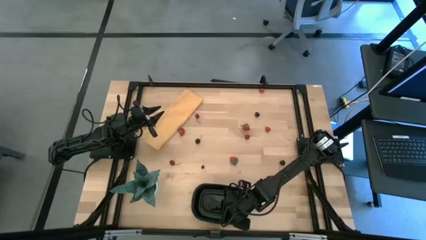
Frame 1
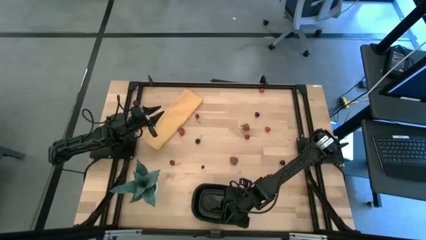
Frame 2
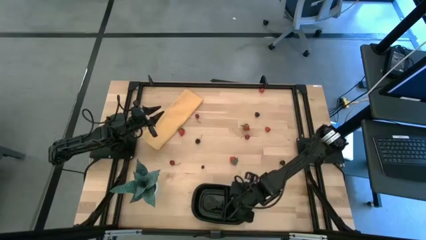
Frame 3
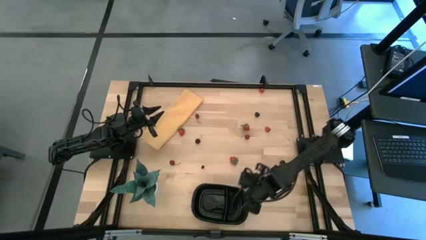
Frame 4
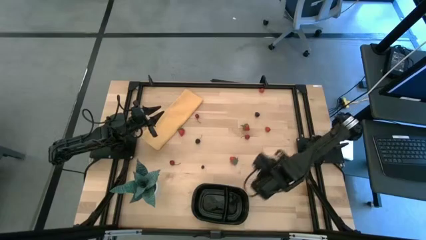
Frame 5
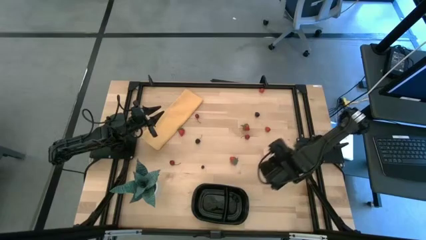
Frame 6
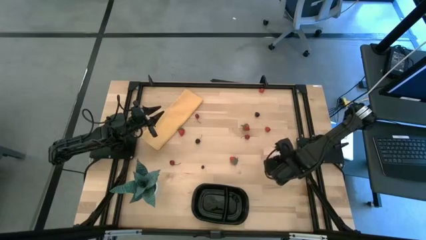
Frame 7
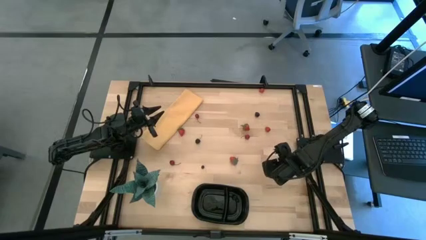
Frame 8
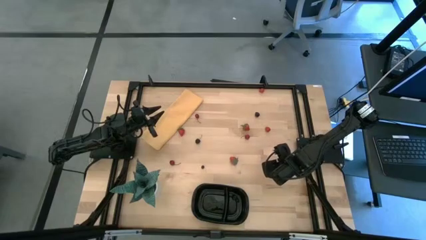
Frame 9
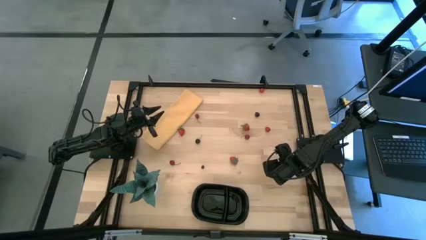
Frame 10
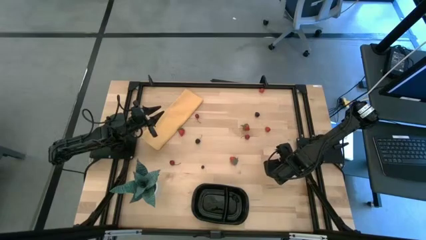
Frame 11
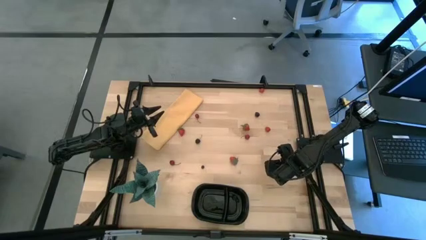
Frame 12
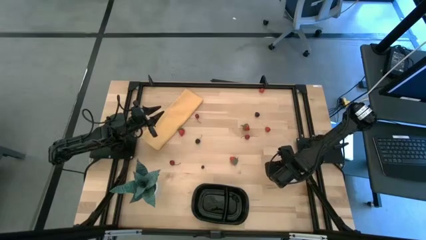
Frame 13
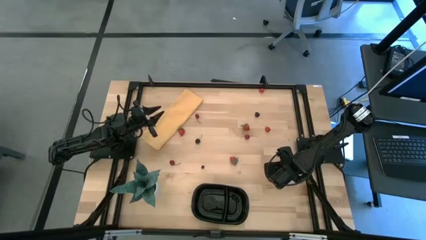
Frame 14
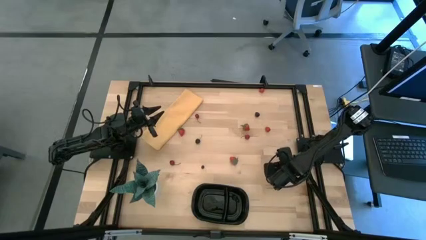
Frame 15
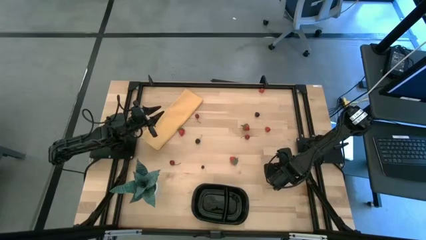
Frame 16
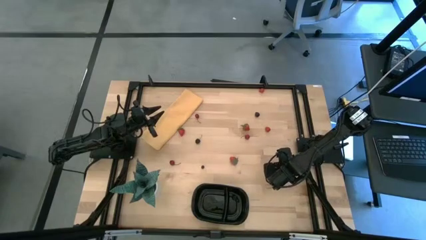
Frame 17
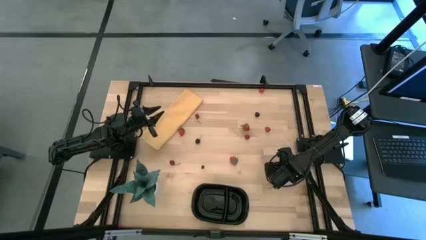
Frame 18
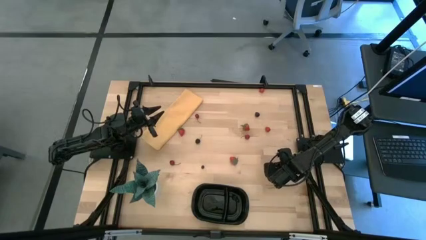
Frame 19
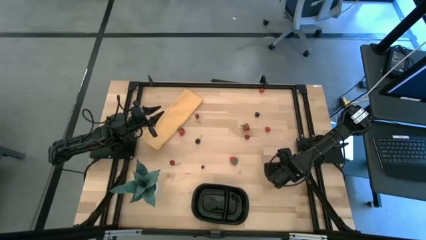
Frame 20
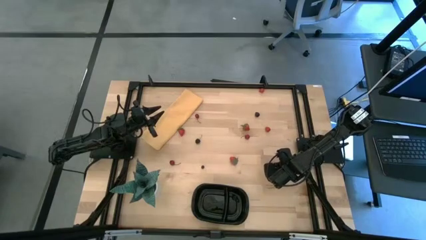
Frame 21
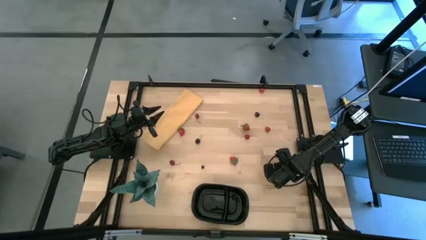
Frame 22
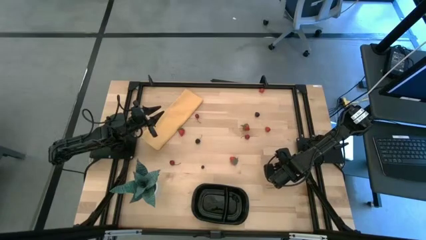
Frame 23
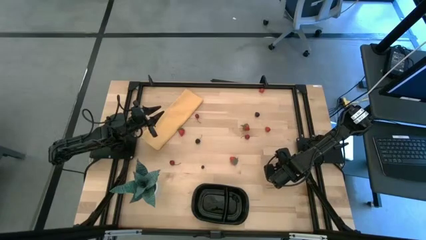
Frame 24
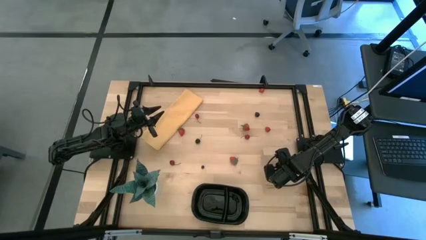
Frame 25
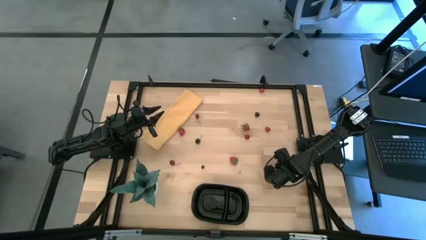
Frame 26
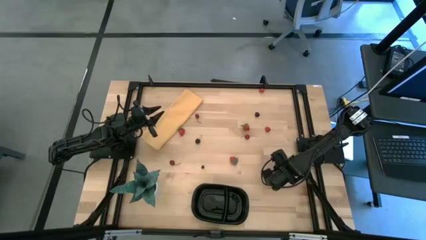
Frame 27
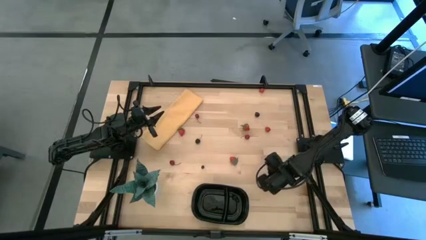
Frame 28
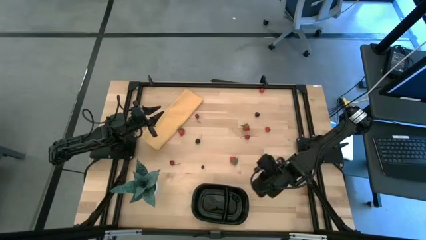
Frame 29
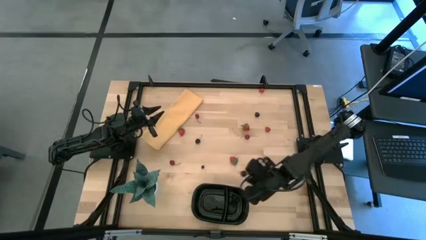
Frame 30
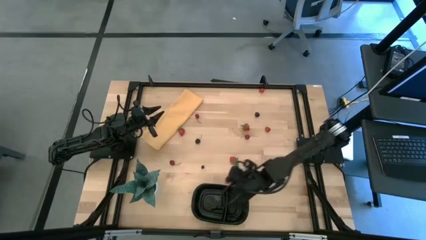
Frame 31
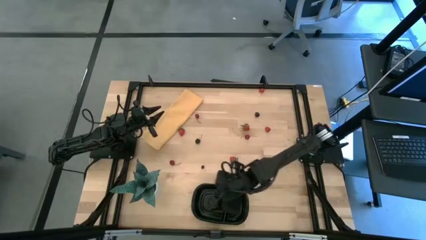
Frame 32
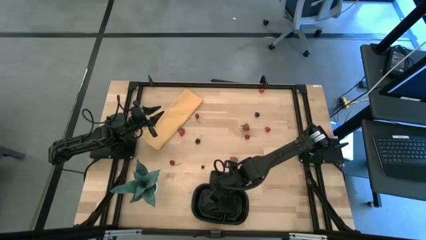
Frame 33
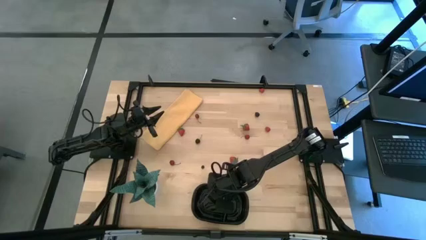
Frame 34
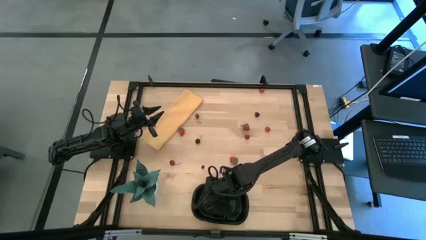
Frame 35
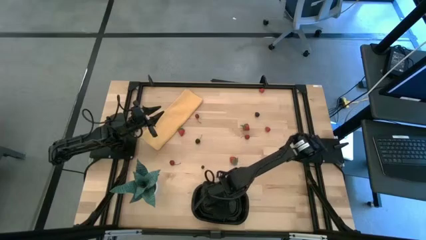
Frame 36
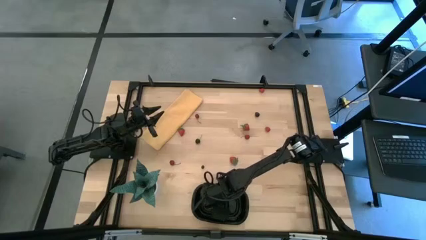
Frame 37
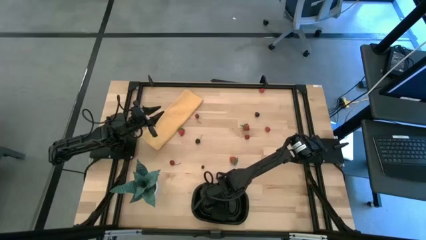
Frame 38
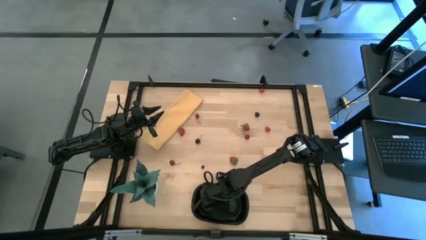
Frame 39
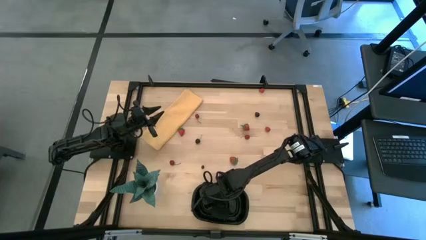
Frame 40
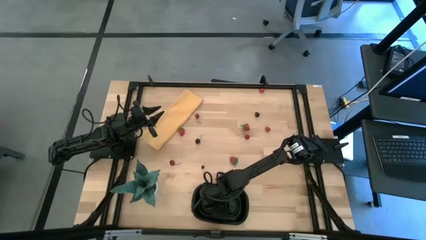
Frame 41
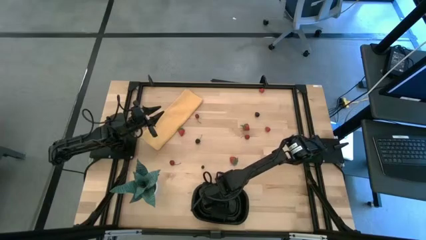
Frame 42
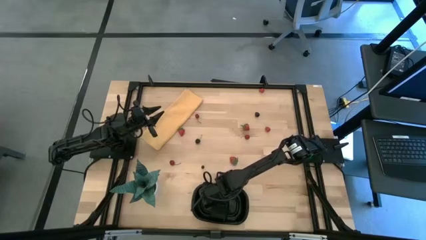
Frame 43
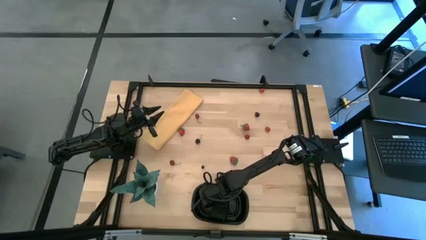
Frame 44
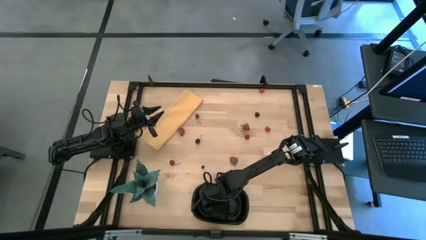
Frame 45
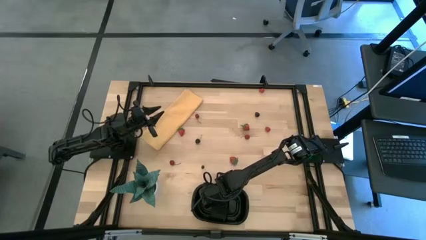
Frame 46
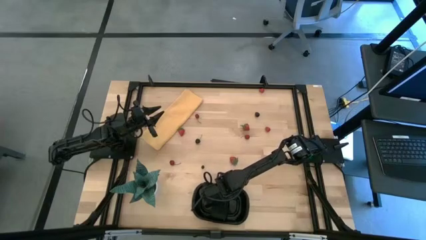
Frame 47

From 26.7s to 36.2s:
Task: Pick and placing Produce into tupperware
Put the right black cherry into the black container

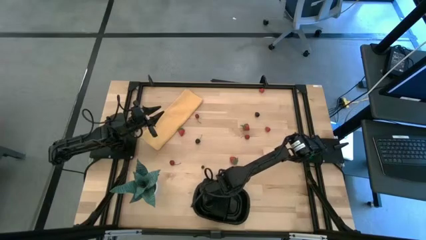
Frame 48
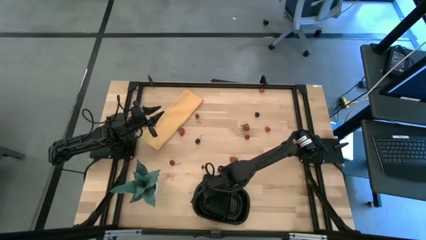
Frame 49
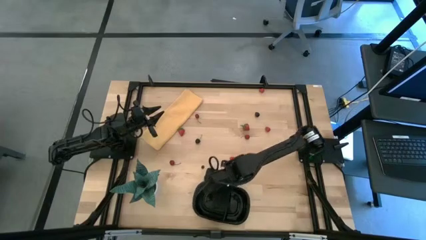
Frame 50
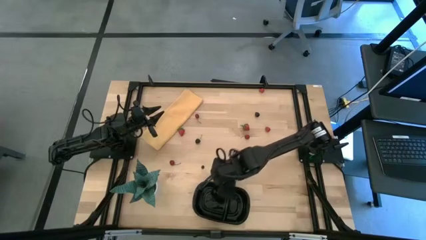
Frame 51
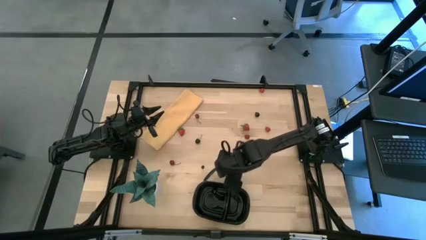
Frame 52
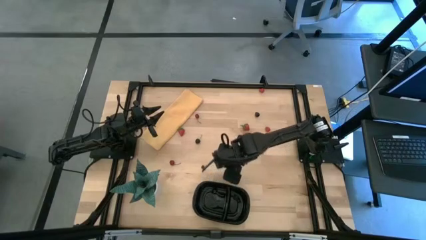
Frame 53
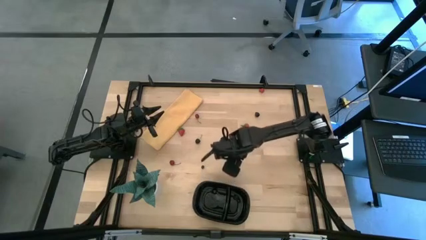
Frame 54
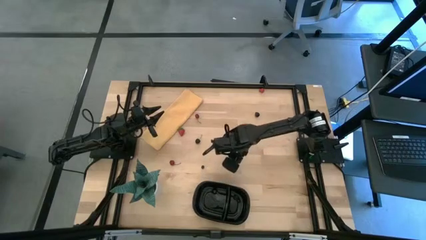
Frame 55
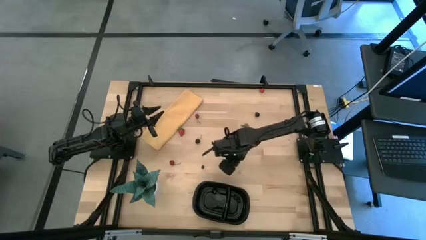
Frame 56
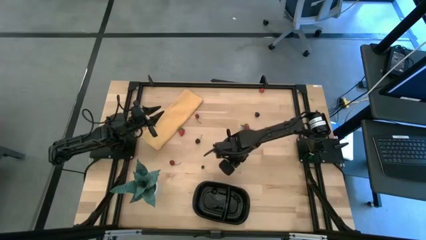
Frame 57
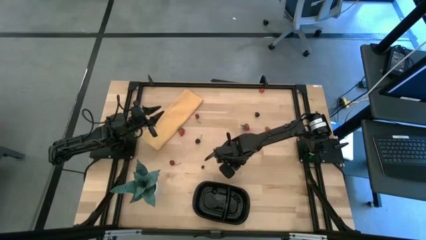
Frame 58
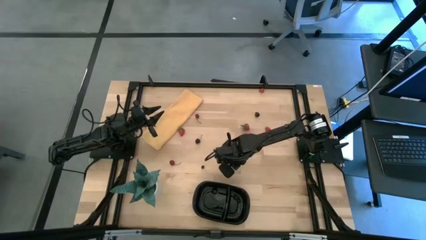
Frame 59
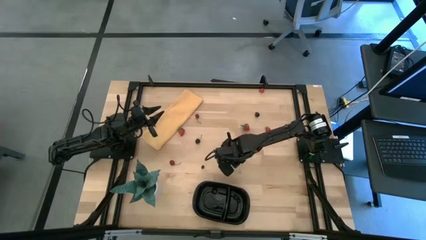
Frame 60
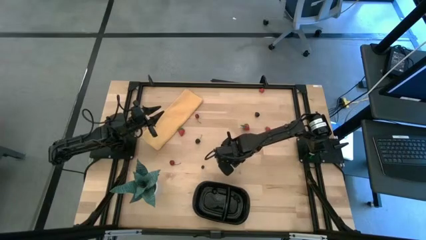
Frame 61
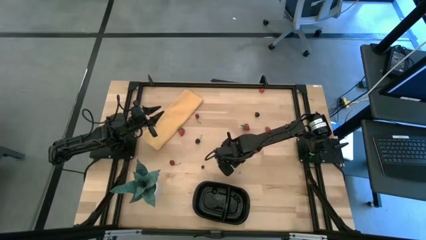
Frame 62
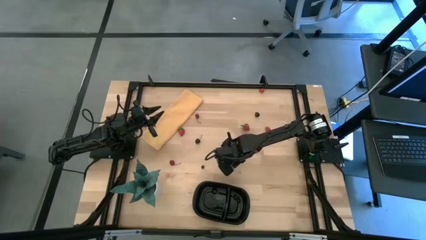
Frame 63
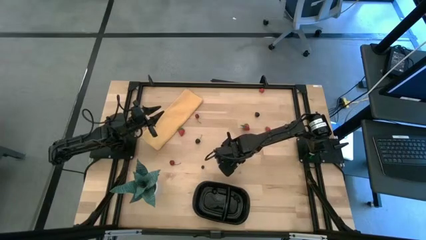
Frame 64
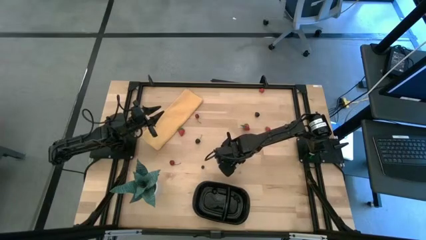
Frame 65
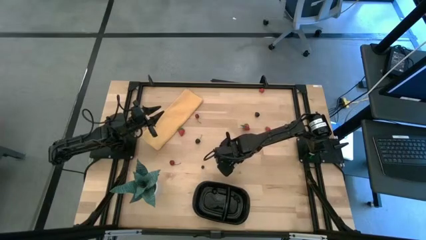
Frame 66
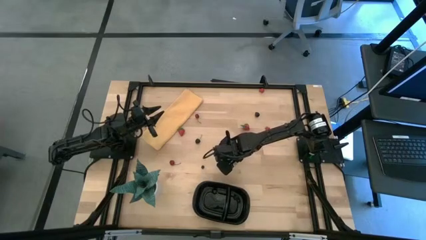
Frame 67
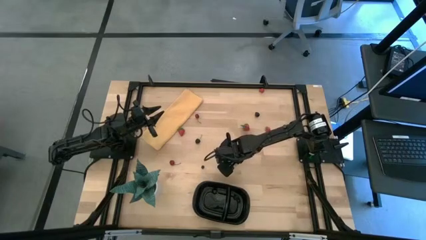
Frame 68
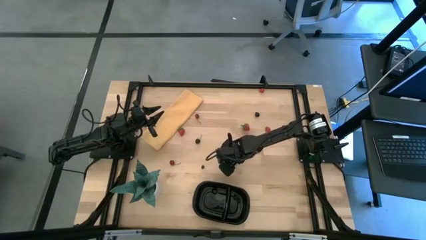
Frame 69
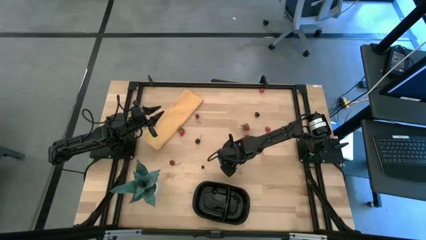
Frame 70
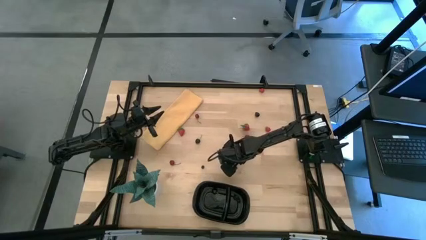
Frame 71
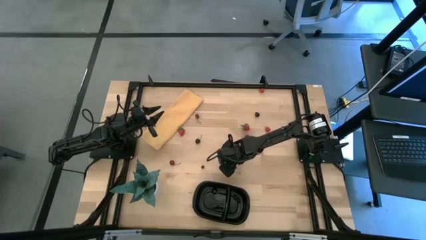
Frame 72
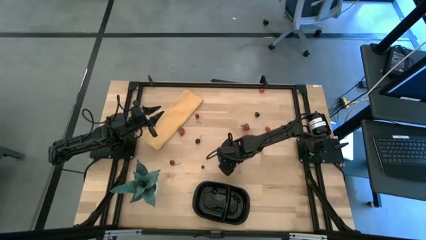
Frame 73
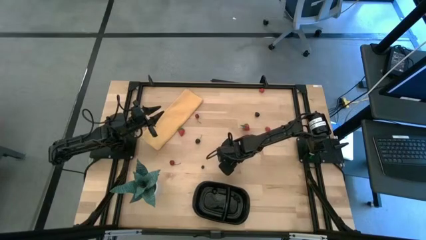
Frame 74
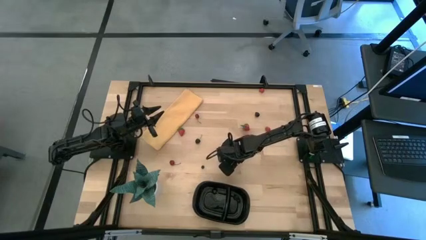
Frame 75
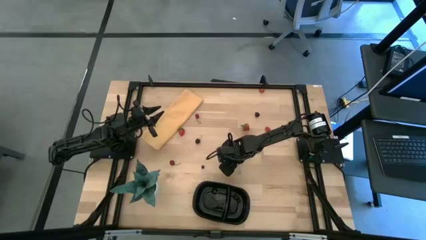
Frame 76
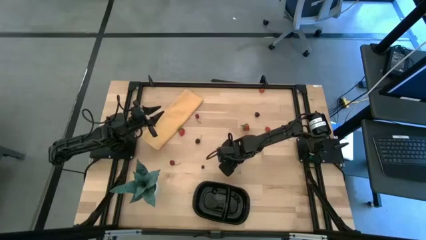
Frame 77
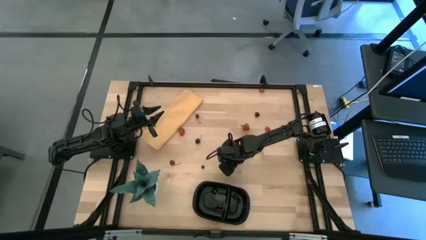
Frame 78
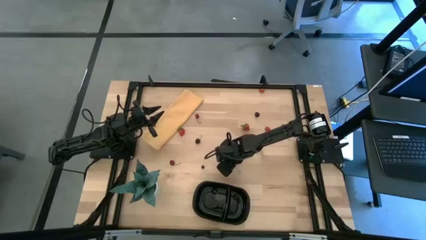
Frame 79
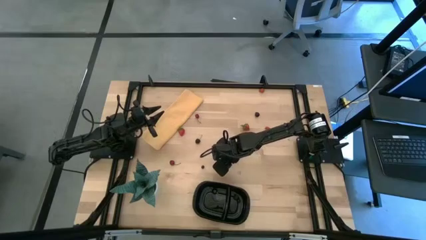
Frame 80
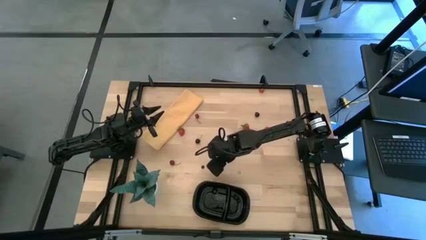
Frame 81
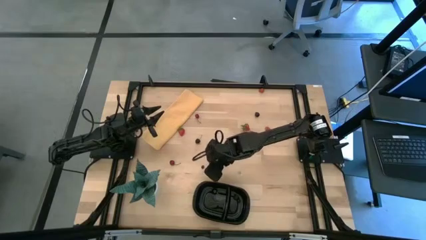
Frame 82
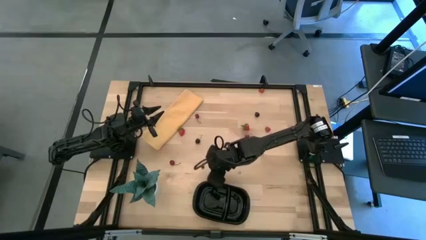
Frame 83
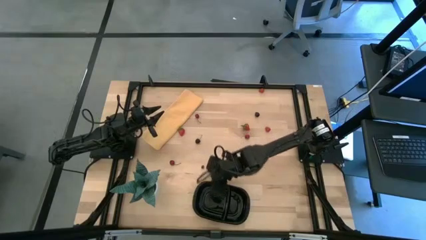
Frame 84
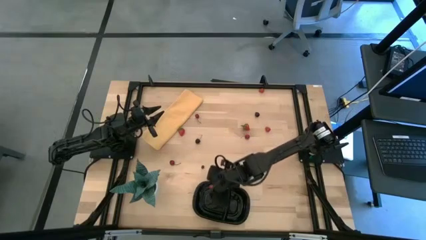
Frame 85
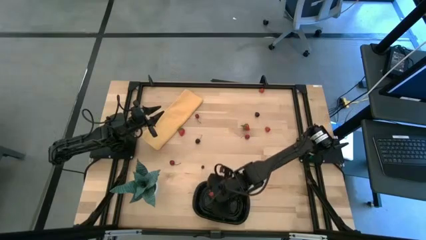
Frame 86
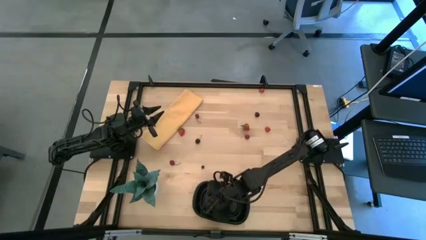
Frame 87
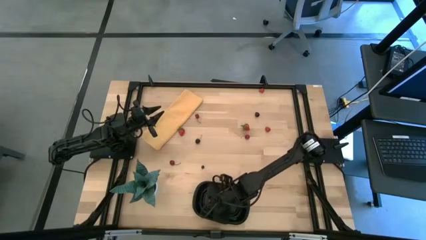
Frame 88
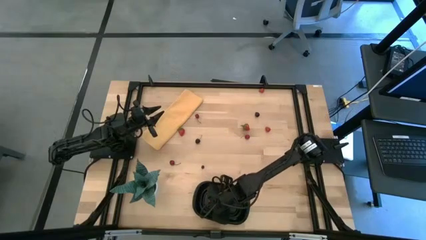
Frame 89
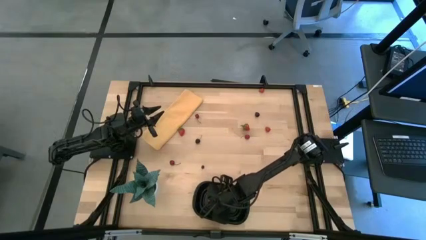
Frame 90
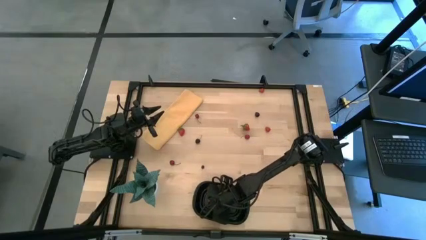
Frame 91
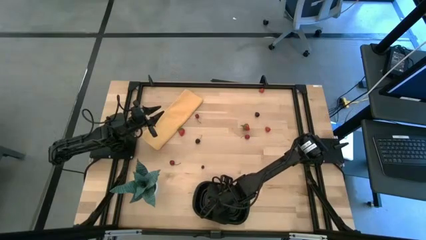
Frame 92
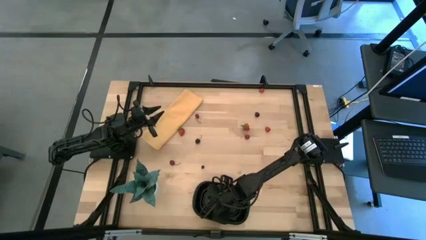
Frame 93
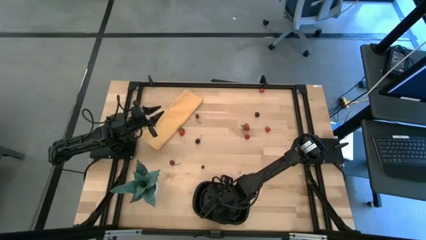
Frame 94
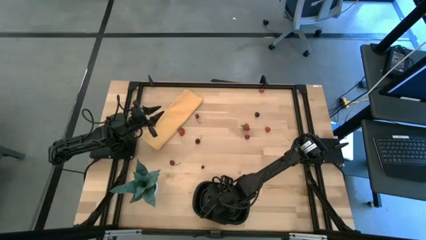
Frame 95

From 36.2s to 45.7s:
Put the bottom right red strawberry into the black container
